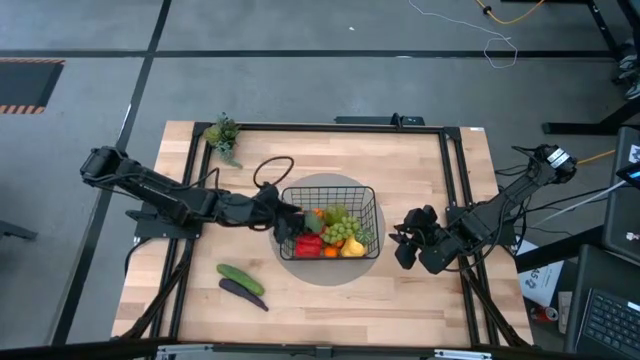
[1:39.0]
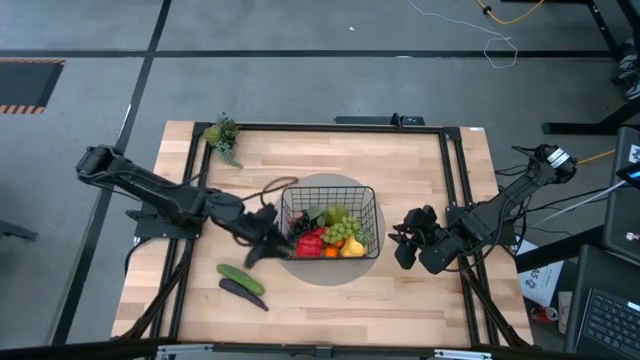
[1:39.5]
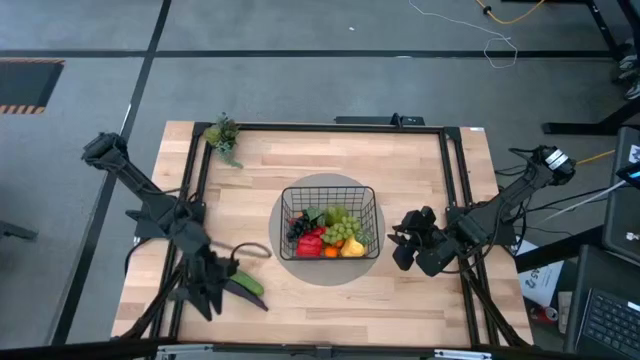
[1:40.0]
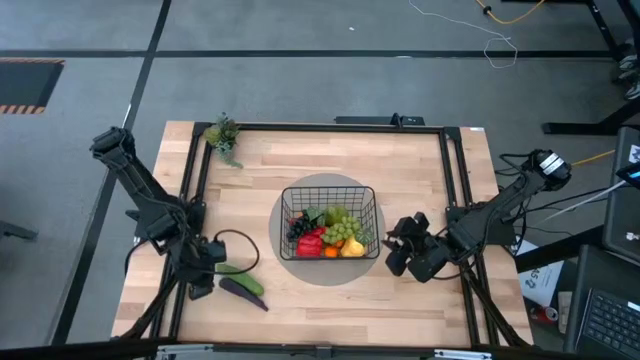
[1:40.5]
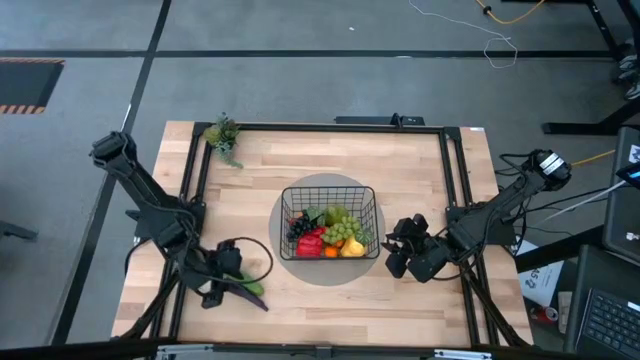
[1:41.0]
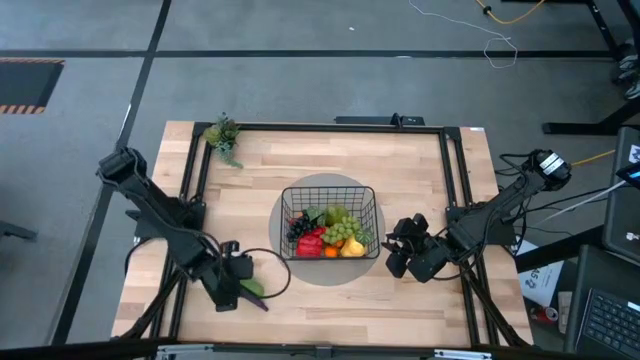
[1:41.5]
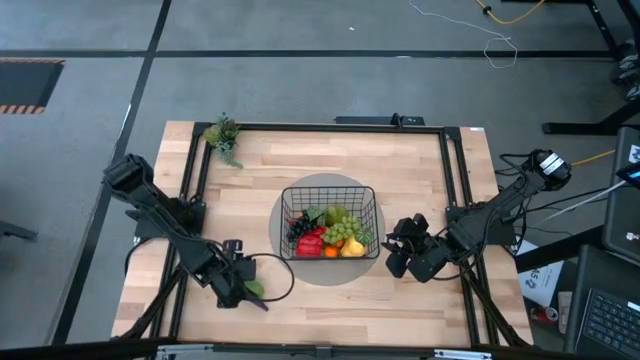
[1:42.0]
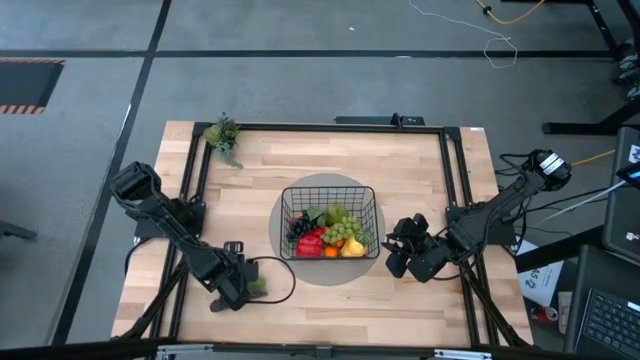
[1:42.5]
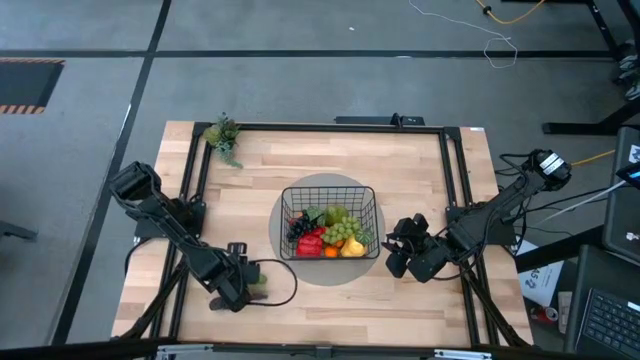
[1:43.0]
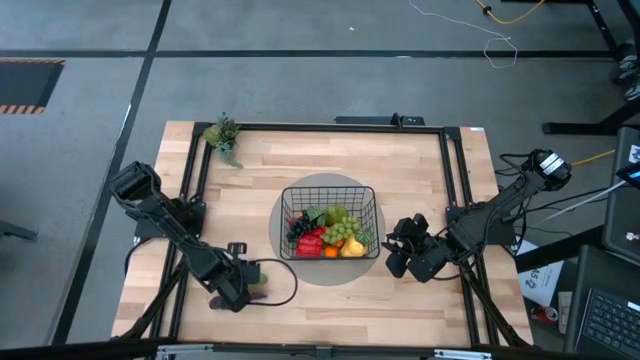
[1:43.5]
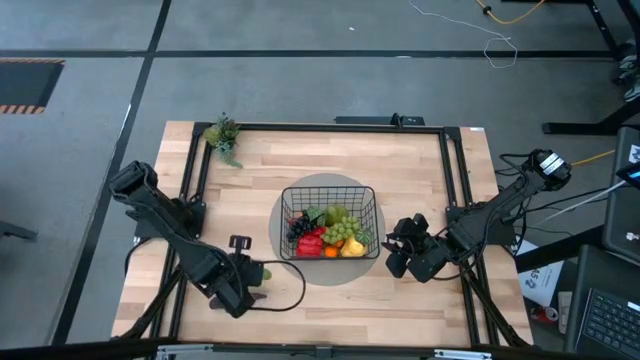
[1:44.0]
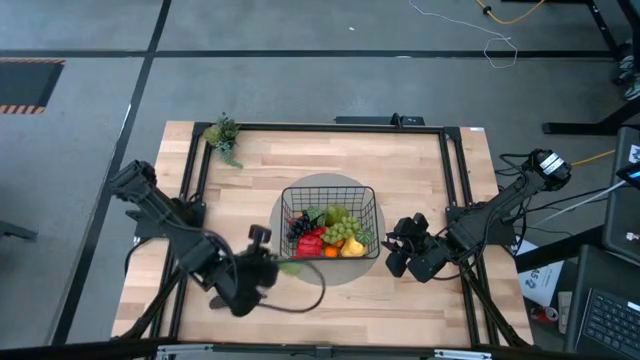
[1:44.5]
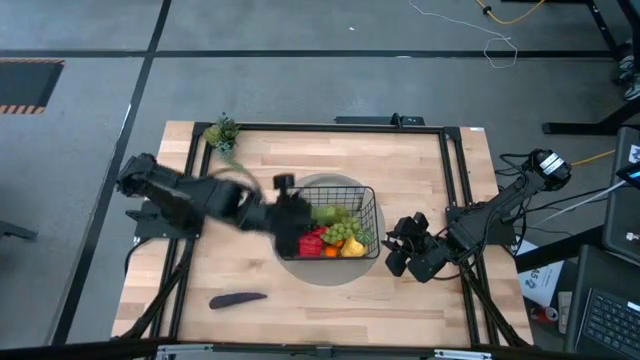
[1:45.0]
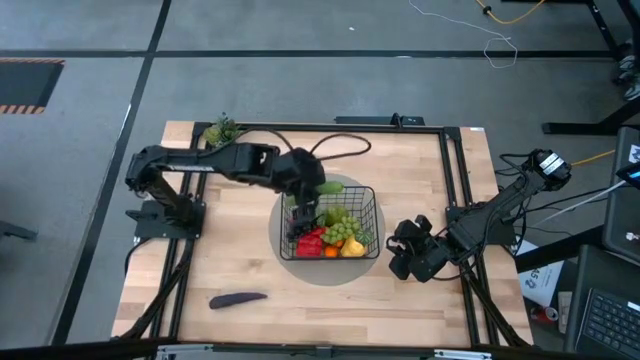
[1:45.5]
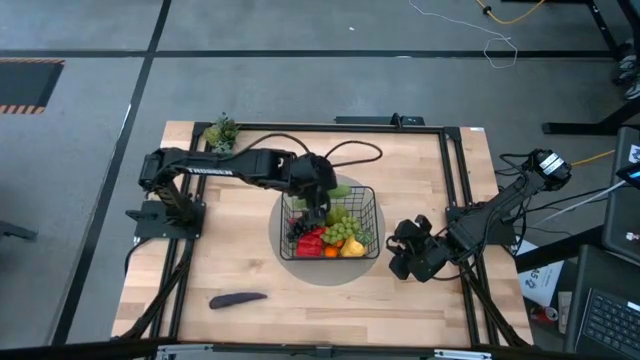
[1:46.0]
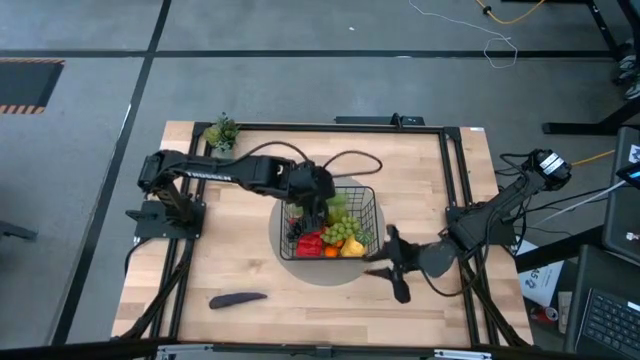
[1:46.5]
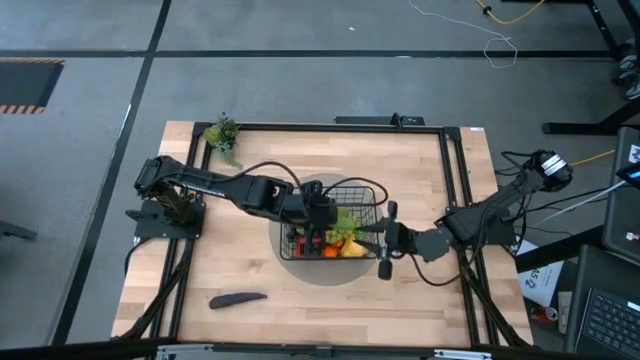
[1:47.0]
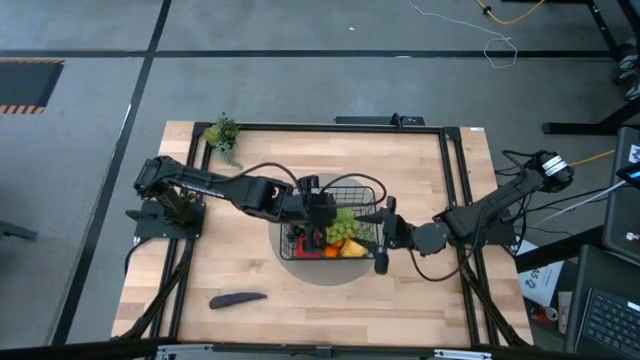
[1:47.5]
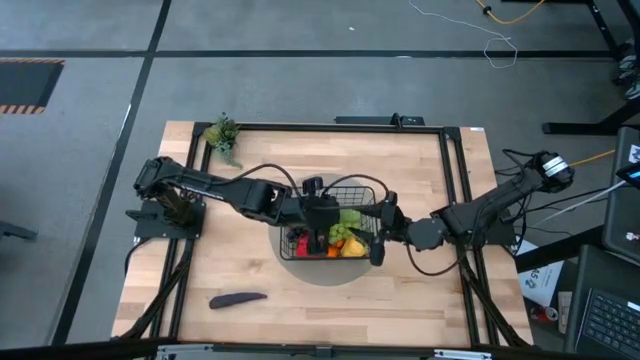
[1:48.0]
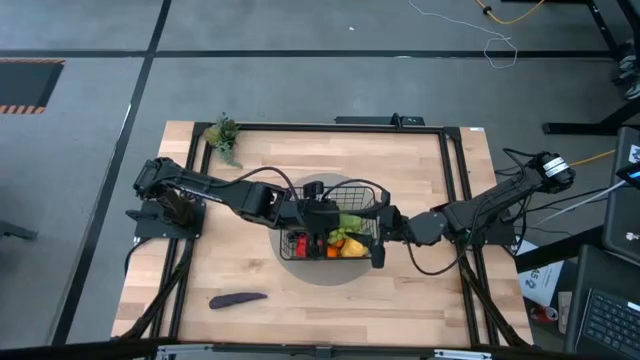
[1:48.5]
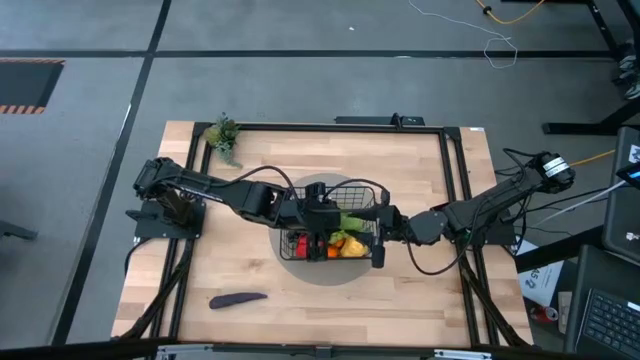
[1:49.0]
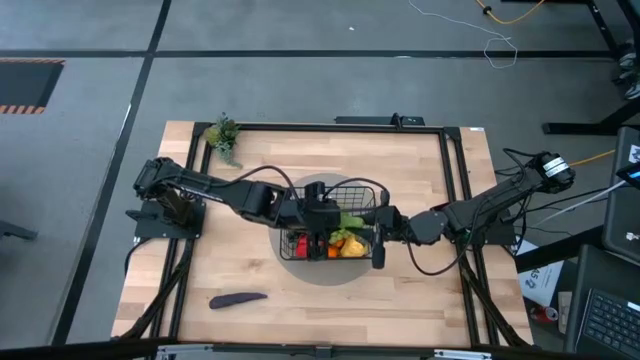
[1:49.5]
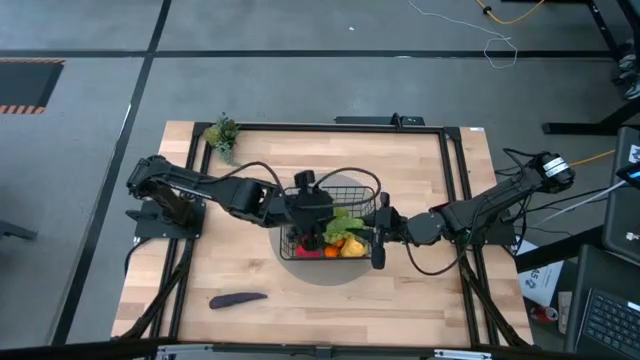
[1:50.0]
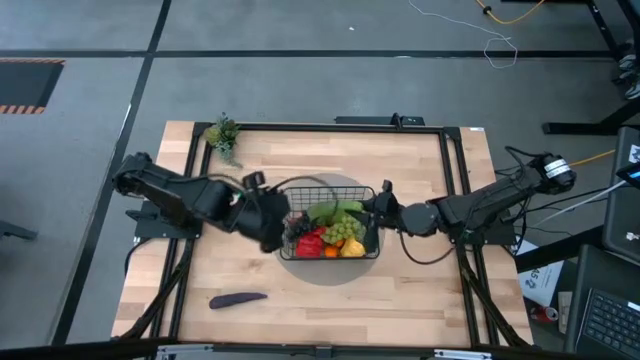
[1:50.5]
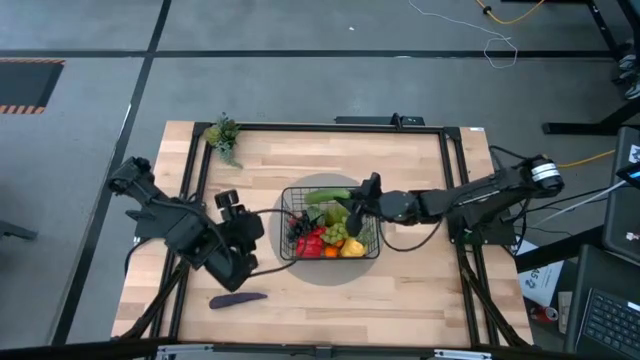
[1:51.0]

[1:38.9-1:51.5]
Task: Build produce basket
Put the cucumber into the black wire basket

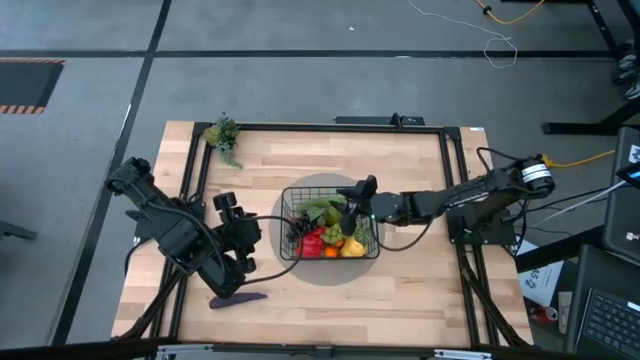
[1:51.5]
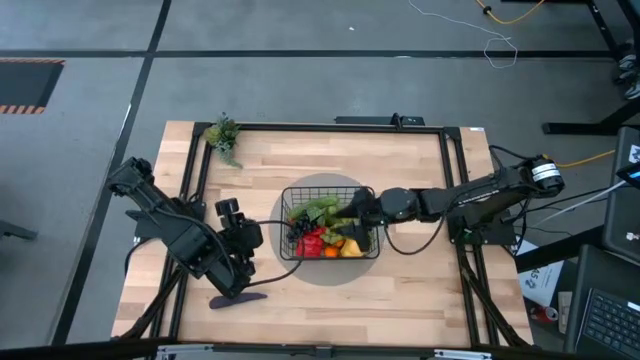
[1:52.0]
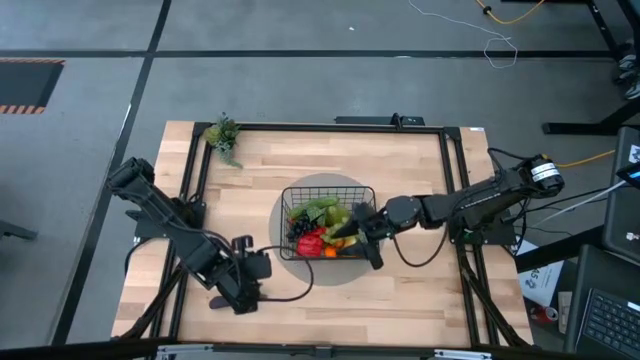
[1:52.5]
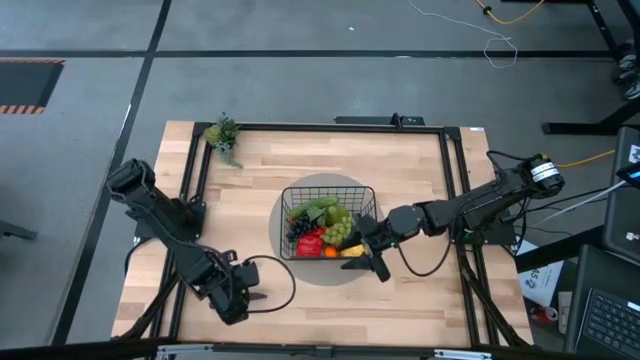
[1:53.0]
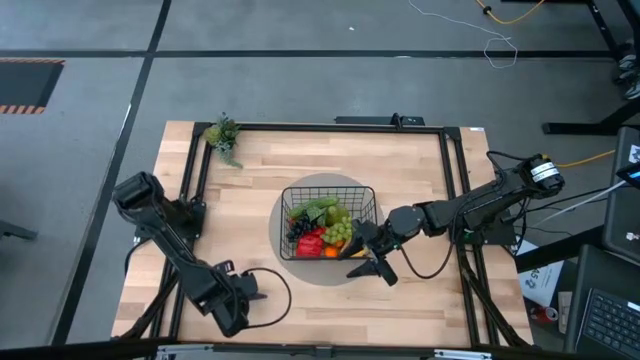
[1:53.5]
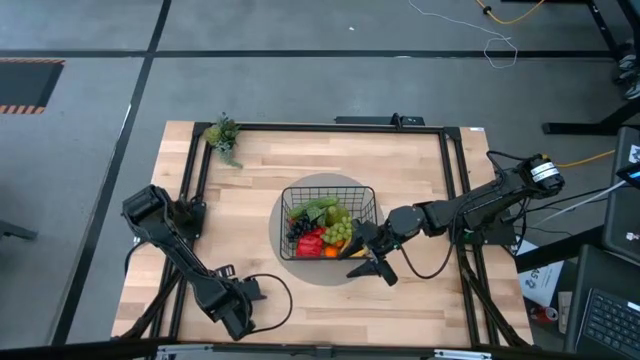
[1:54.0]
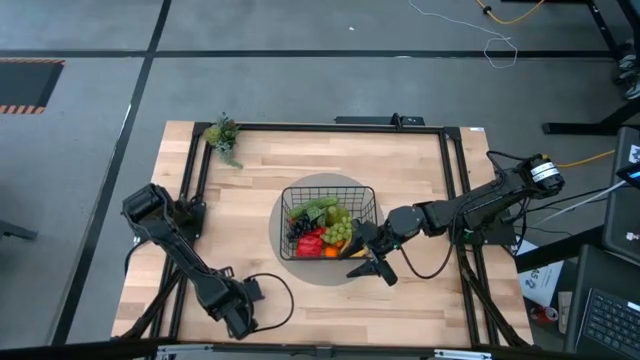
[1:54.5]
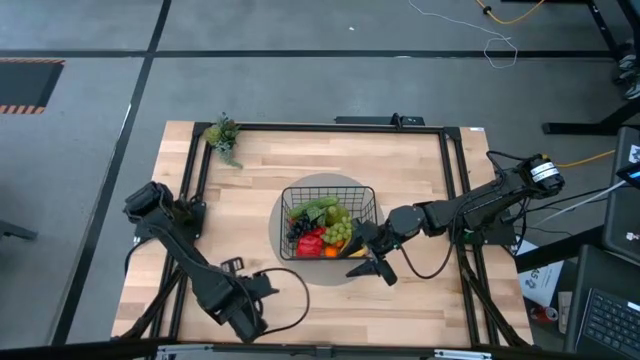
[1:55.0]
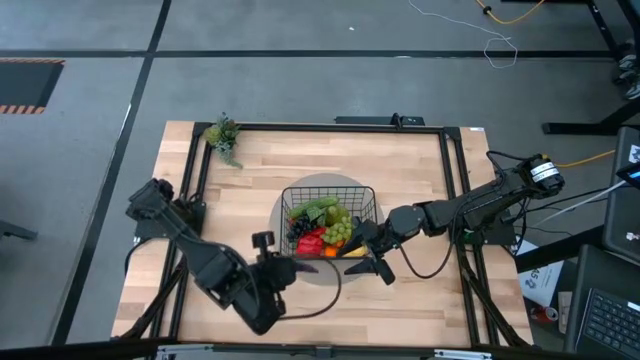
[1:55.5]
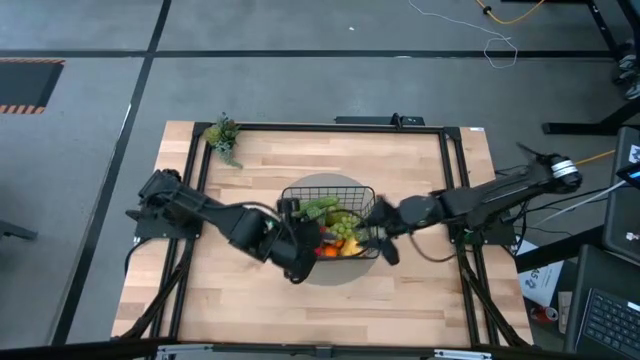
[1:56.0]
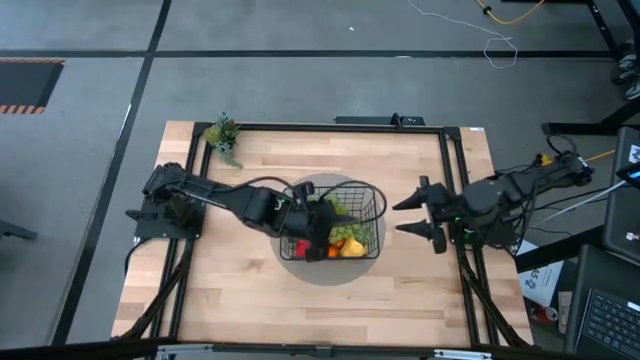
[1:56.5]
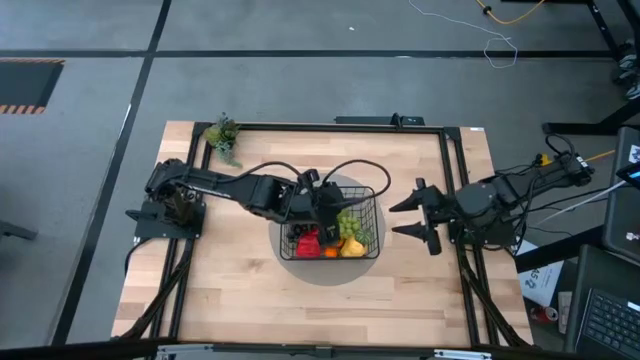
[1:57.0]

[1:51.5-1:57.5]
Put the eggplant into the black wire basket

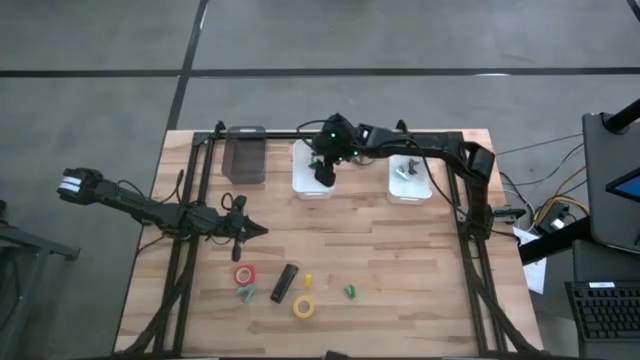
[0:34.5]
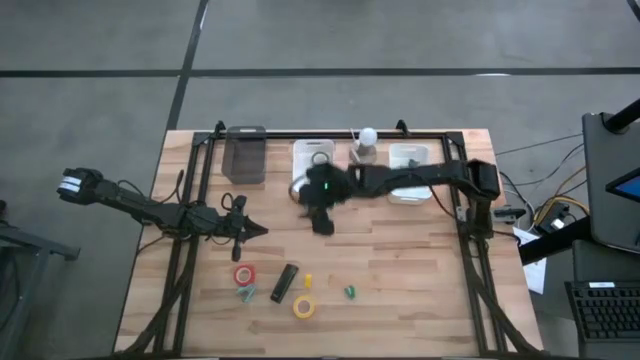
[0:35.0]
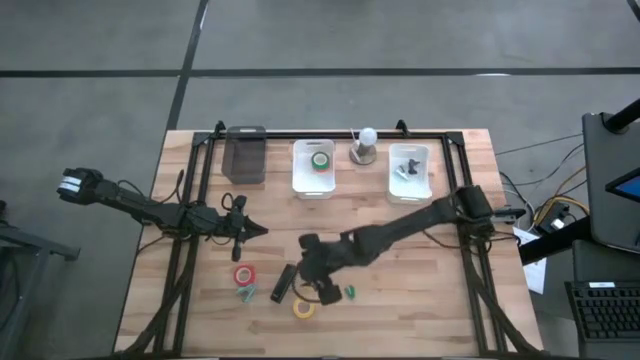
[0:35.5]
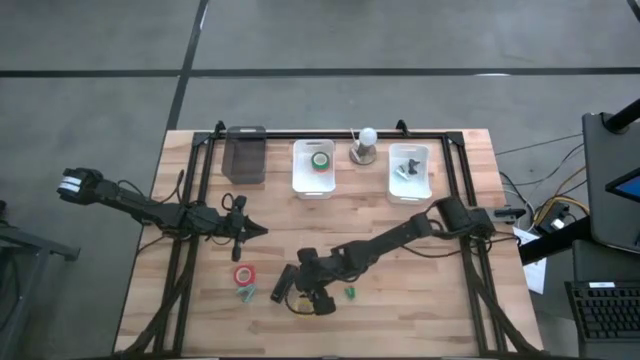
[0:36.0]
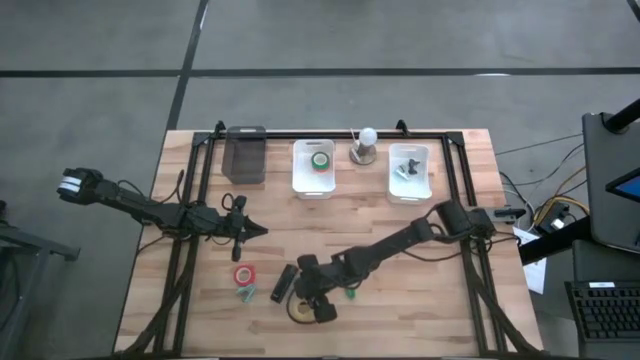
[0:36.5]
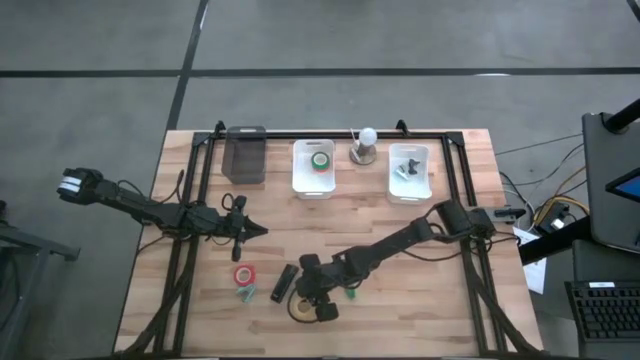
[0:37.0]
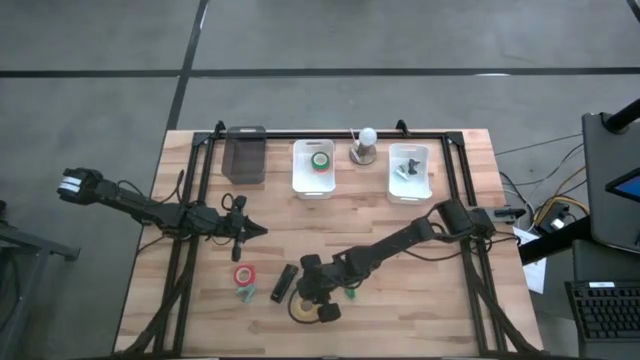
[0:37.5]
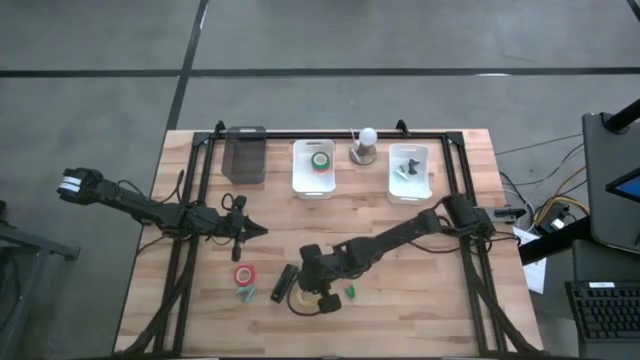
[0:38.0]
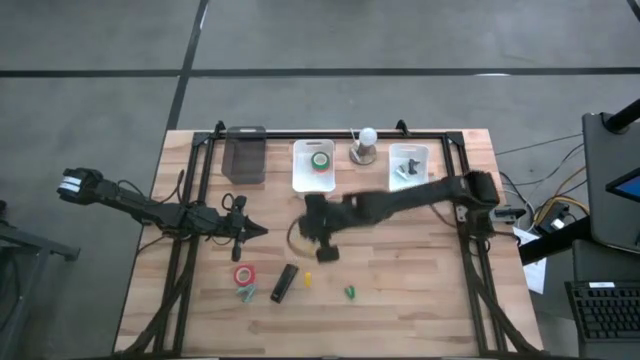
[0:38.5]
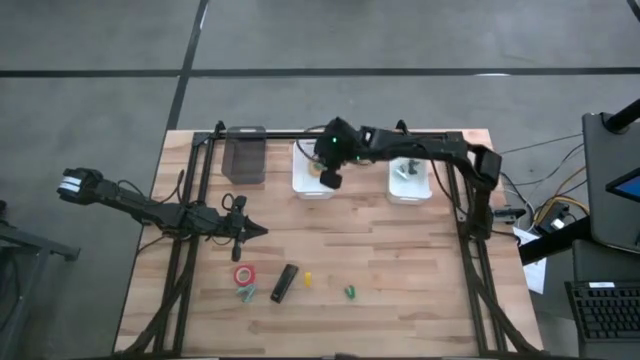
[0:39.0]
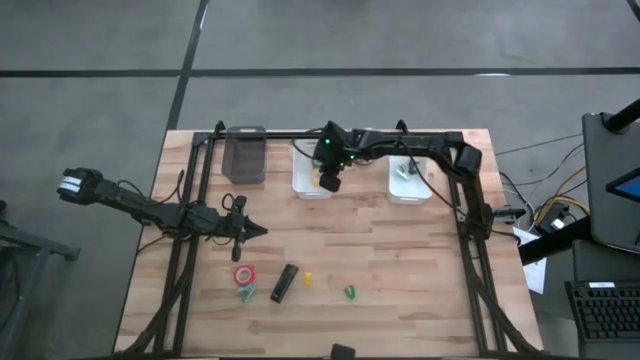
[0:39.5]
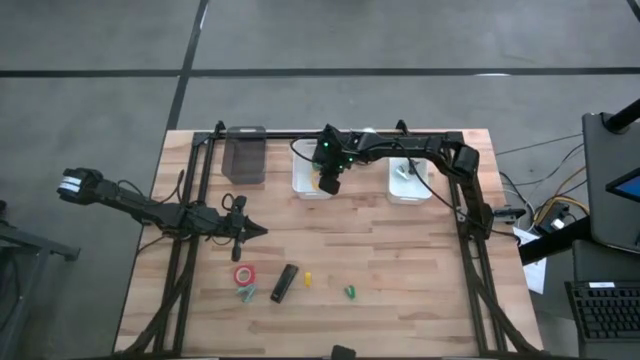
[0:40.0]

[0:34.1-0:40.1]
Task: Pick and place Stapler, Stapler remover, tape
Put the yellow tape into the left white bin
